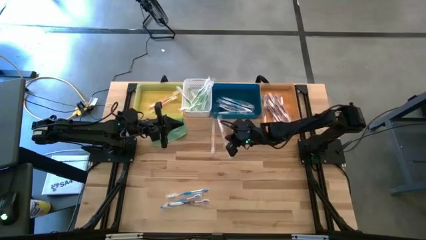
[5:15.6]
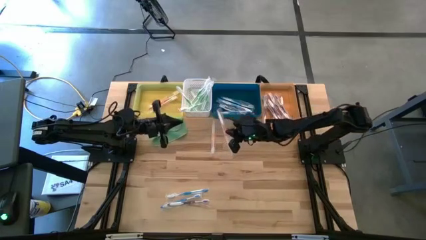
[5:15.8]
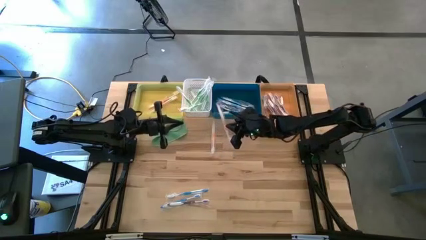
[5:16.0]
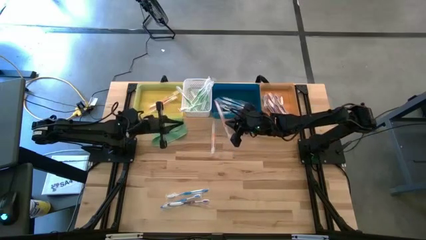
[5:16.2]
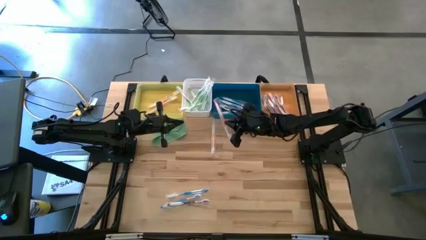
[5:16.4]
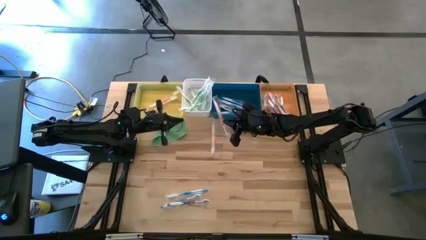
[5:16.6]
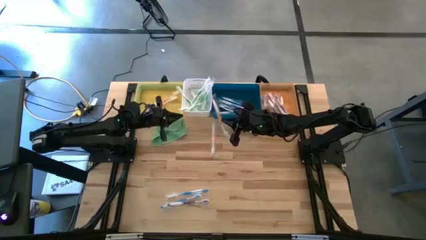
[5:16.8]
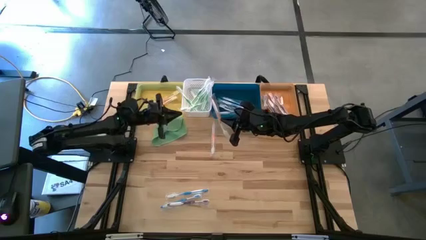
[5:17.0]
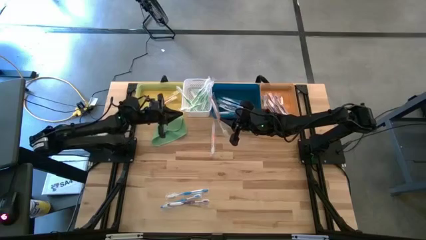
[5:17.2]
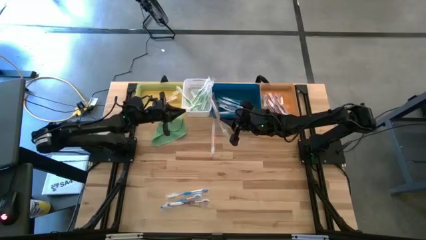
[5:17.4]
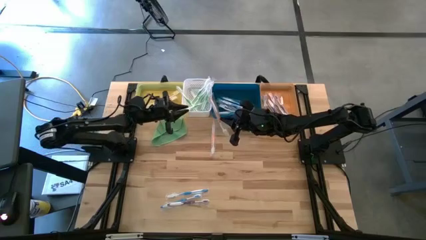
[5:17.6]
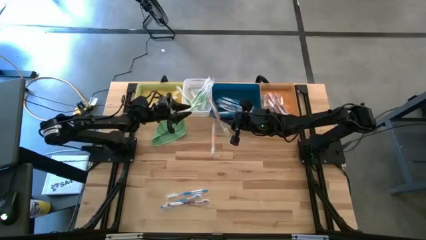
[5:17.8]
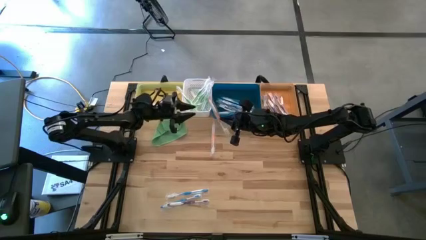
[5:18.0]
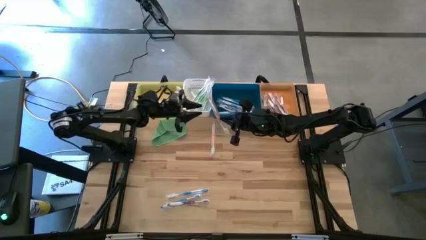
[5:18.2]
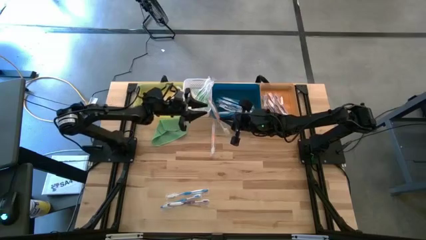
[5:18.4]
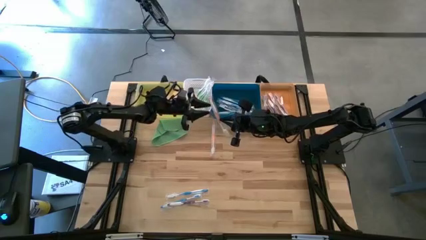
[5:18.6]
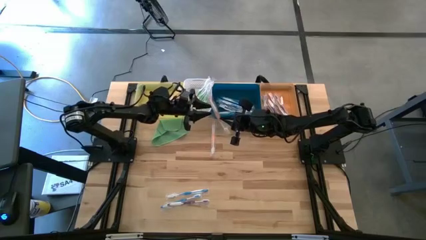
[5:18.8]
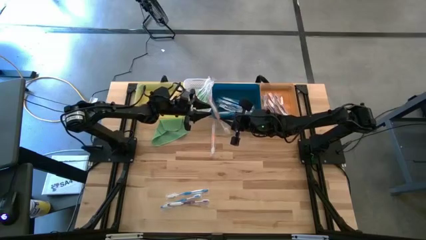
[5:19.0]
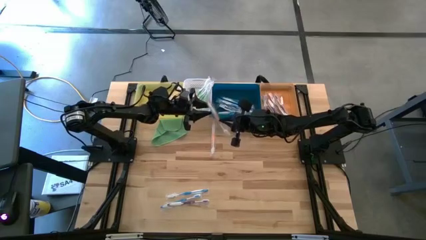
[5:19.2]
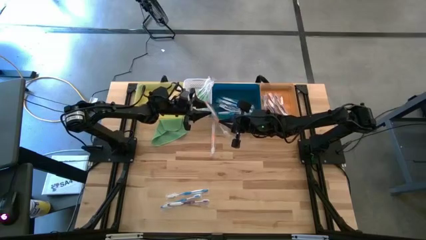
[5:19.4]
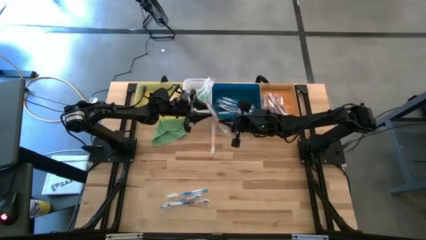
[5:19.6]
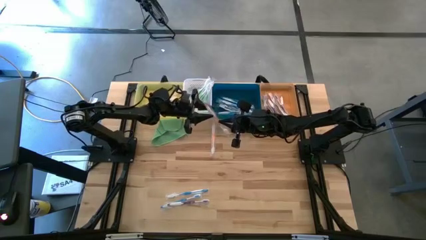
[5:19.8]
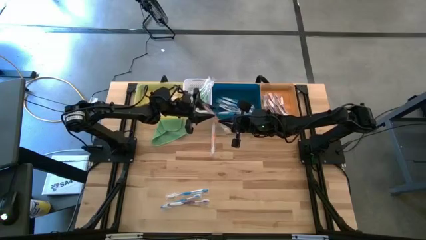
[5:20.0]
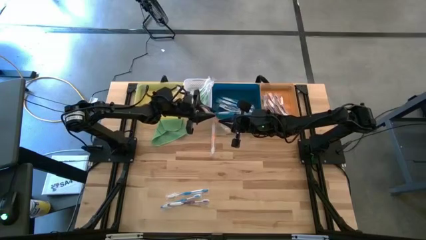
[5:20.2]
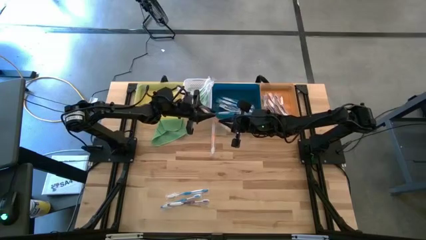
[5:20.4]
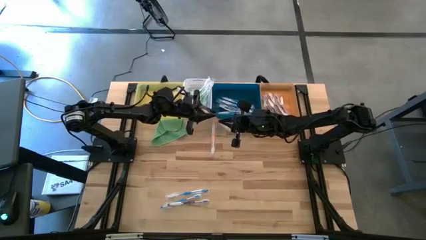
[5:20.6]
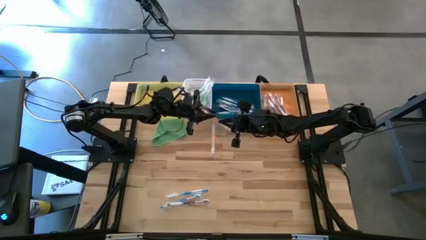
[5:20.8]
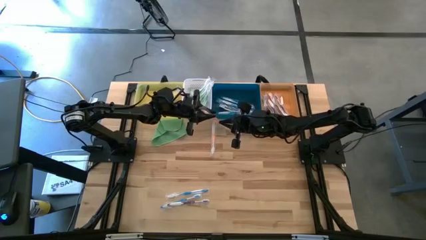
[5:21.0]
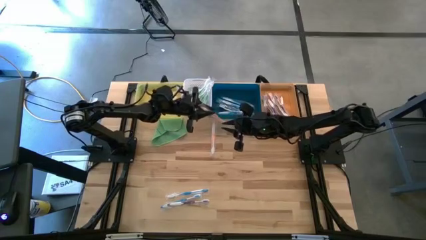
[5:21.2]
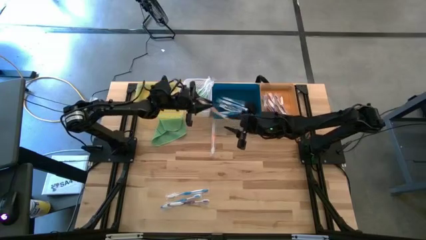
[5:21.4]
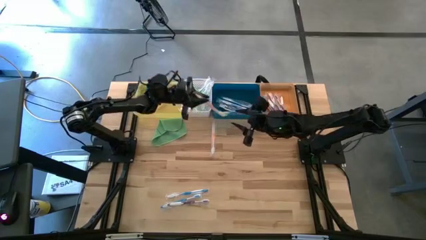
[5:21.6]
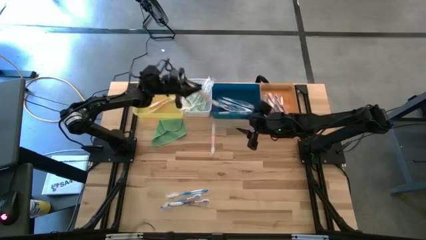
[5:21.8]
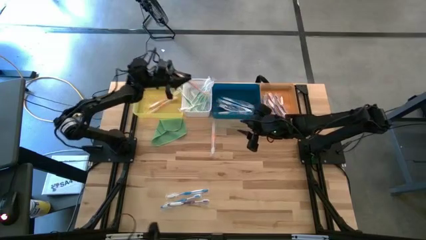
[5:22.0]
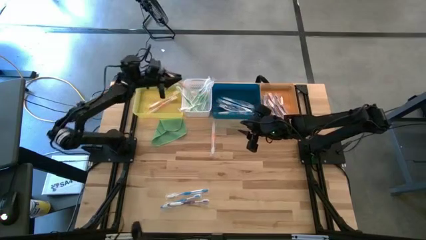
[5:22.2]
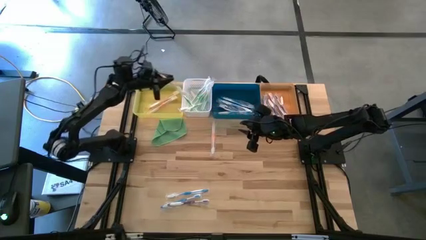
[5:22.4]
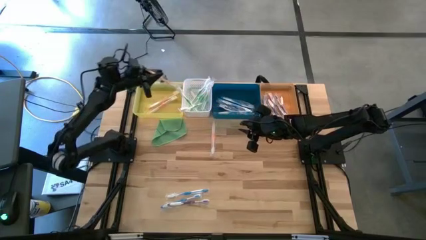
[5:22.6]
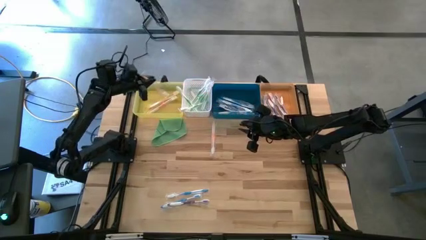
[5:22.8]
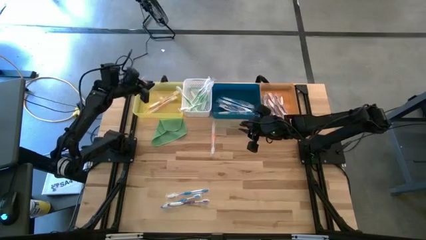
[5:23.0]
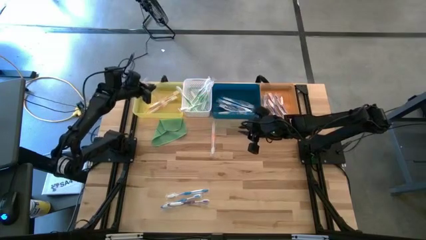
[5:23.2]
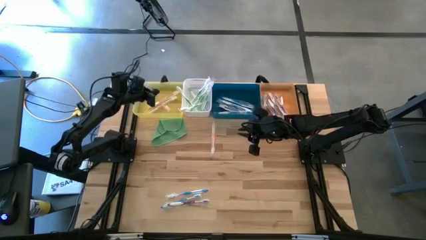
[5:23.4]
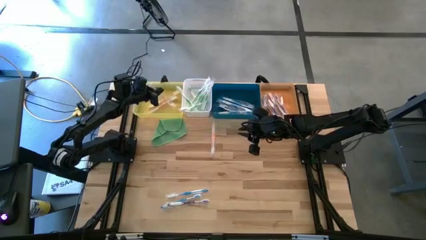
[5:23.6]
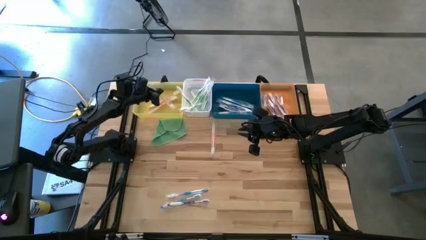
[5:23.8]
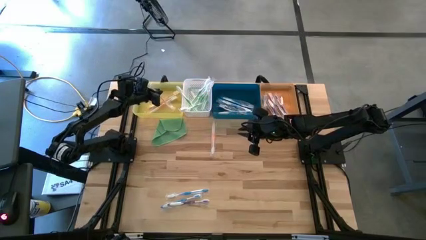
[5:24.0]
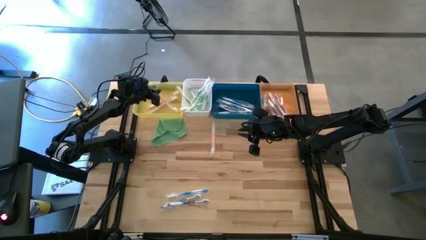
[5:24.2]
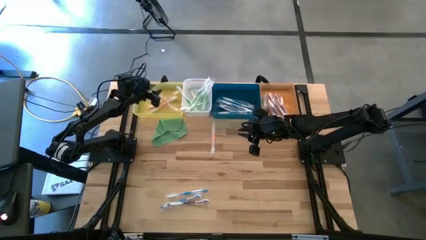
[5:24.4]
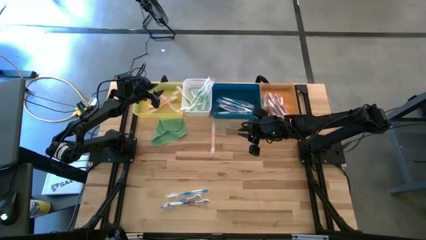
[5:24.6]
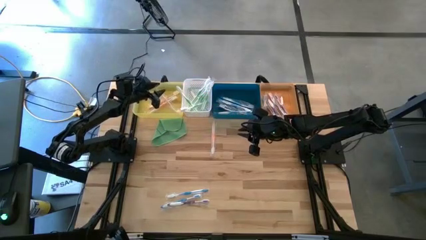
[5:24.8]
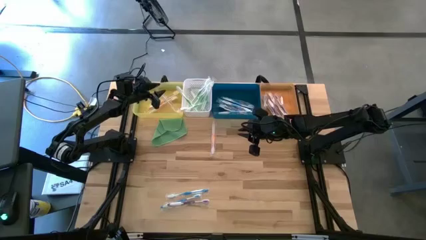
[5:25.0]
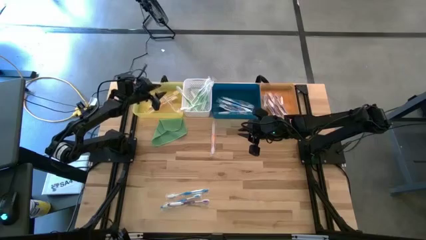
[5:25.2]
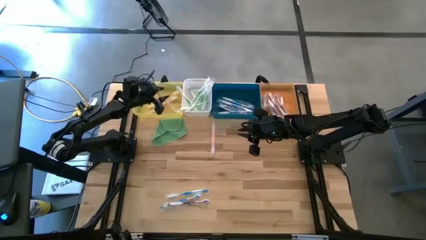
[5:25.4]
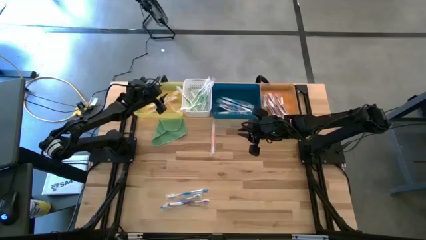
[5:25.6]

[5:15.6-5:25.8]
Task: Pick & Place Toothbrushes
Put the orange toothbrush into the yellow bin

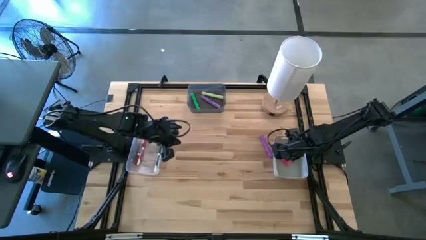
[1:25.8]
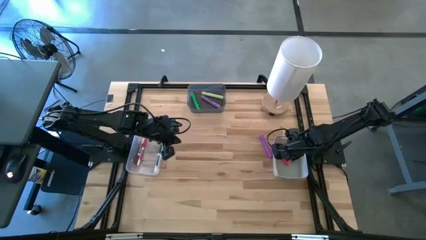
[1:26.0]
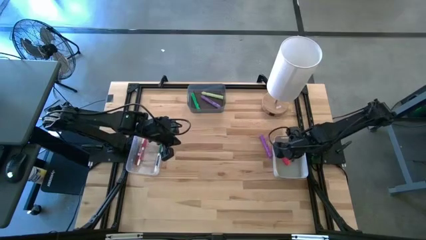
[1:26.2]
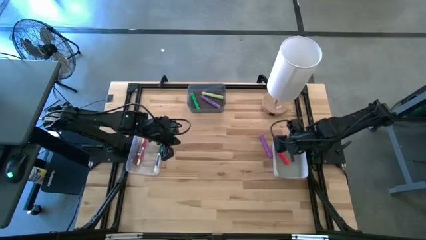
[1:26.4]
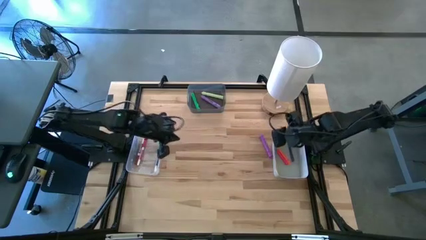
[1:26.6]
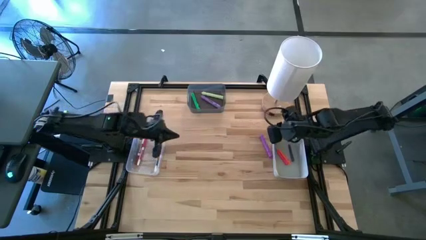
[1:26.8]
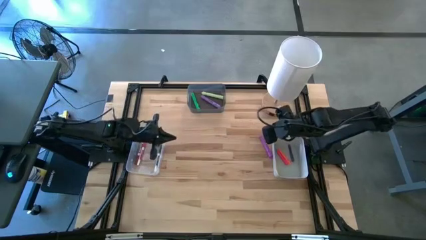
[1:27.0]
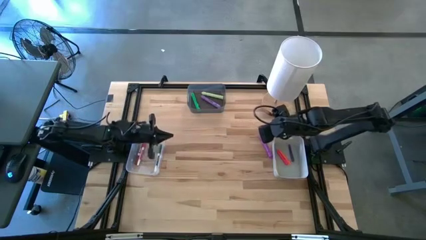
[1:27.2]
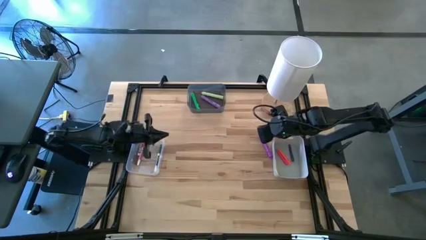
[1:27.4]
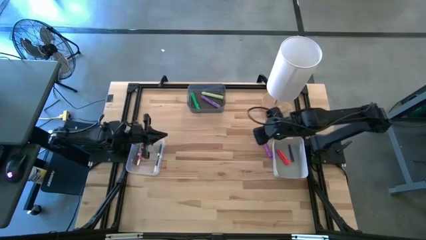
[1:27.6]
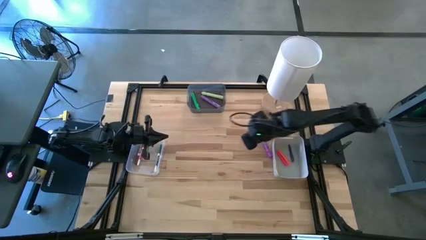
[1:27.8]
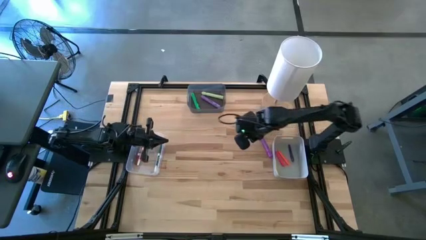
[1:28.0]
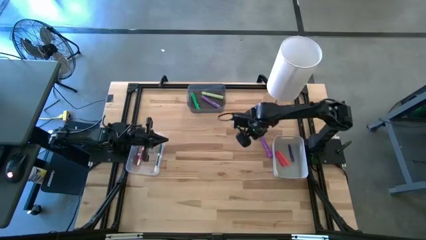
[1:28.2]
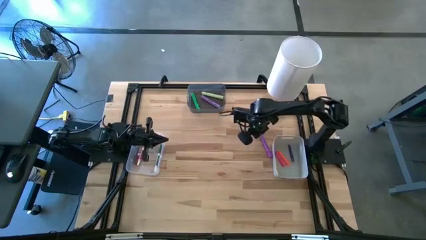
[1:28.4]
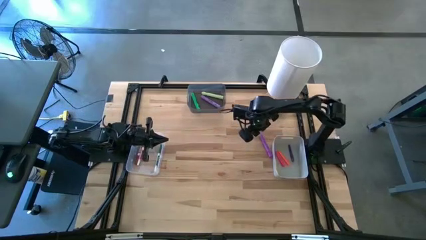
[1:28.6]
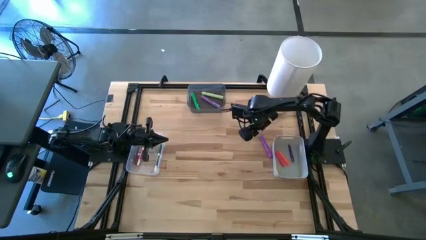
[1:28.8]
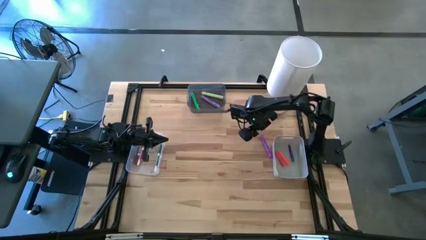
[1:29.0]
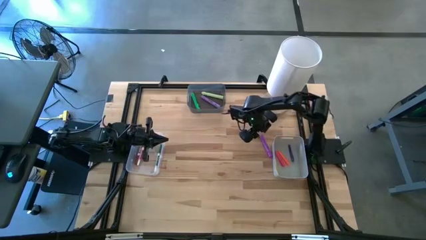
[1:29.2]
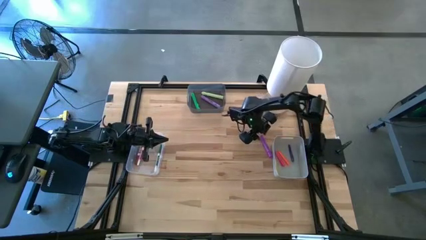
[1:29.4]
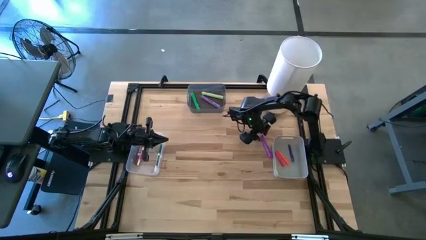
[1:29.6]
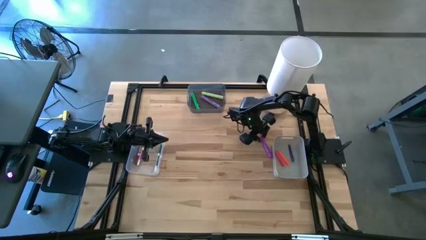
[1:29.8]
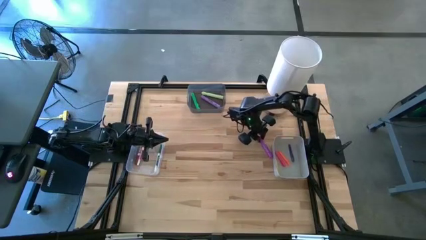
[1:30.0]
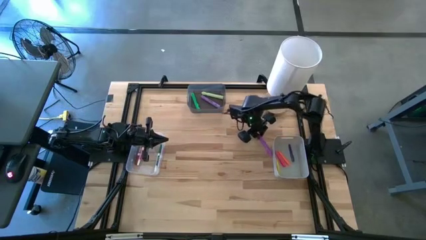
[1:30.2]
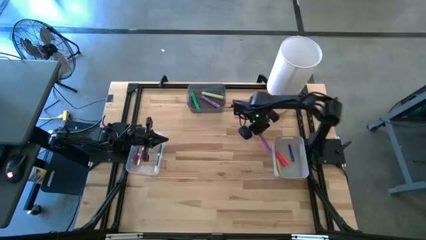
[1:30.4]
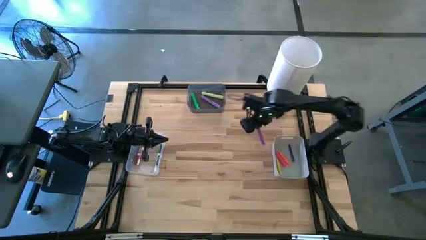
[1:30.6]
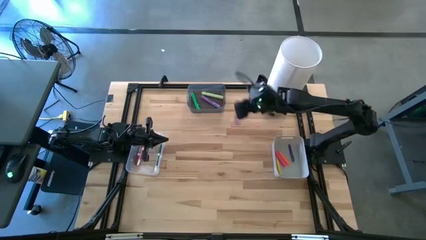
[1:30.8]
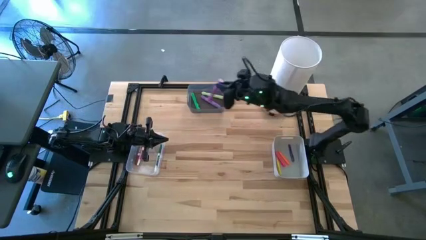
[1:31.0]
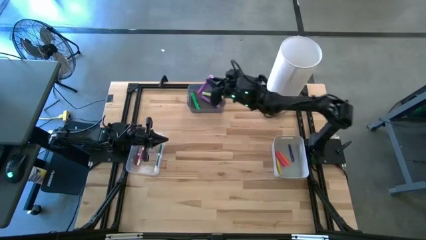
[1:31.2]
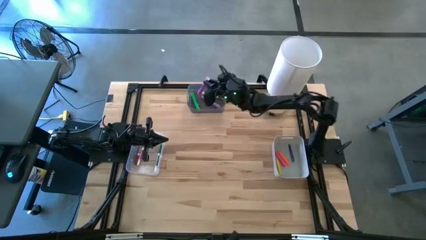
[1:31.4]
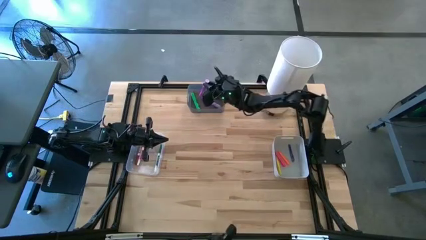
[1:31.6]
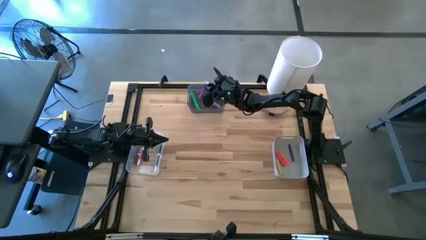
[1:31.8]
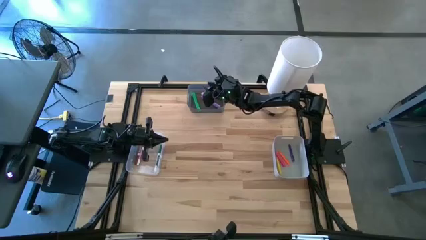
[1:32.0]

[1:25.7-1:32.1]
Task: Pick & Place Markers
Put the purple highlighter into the black bin
